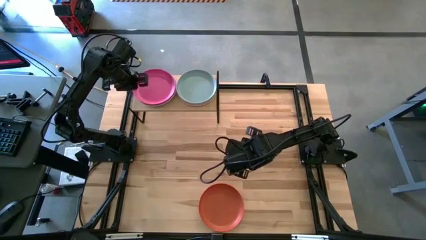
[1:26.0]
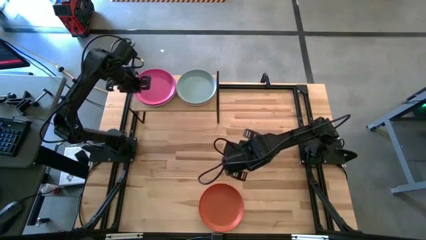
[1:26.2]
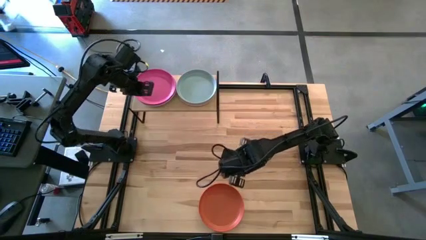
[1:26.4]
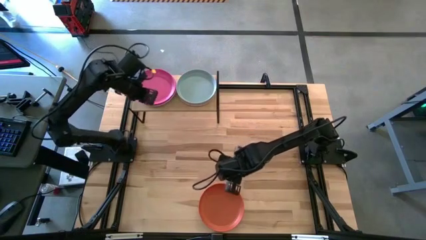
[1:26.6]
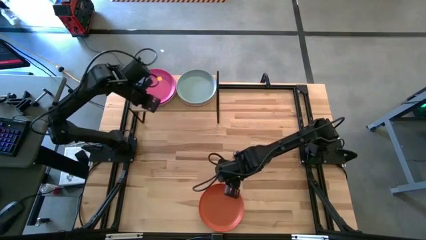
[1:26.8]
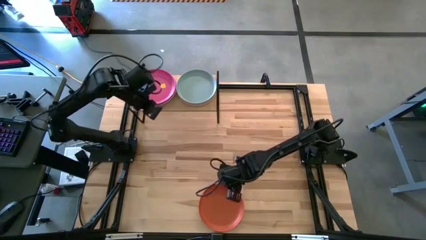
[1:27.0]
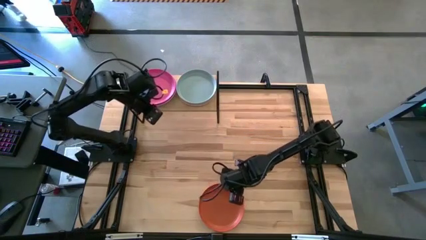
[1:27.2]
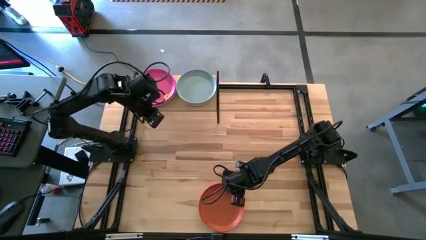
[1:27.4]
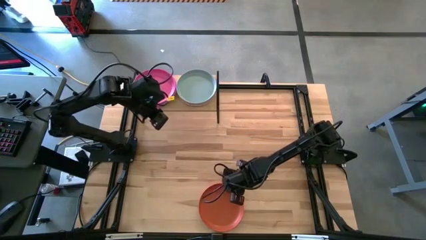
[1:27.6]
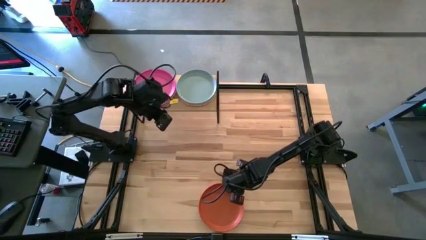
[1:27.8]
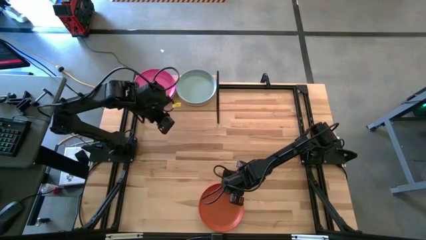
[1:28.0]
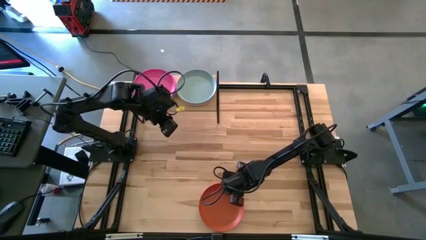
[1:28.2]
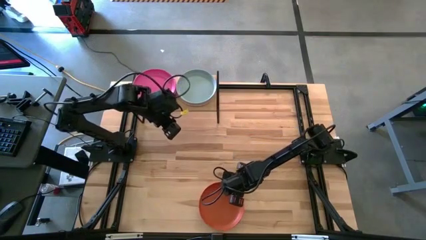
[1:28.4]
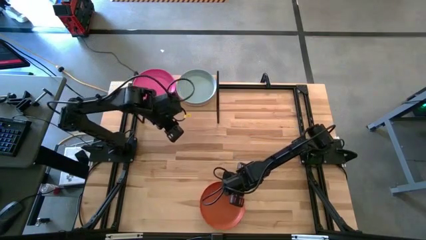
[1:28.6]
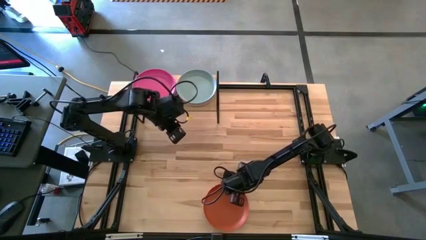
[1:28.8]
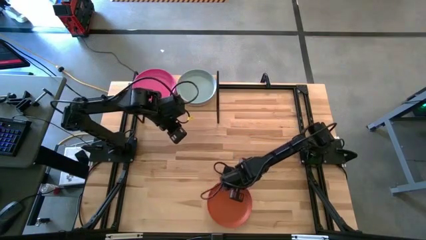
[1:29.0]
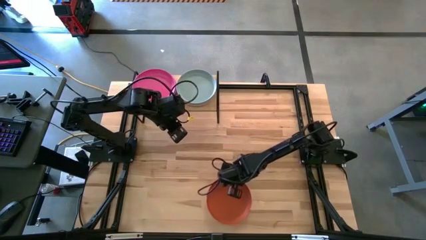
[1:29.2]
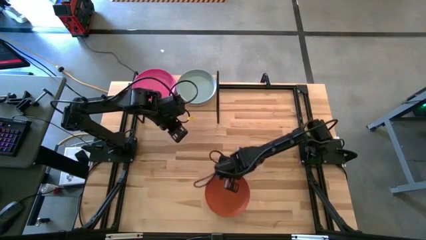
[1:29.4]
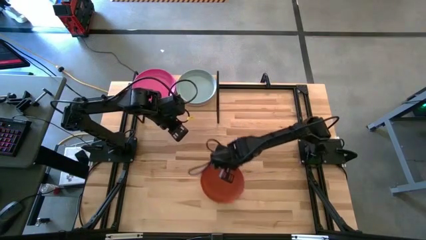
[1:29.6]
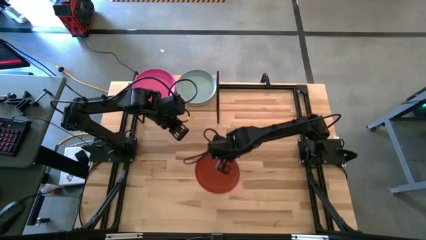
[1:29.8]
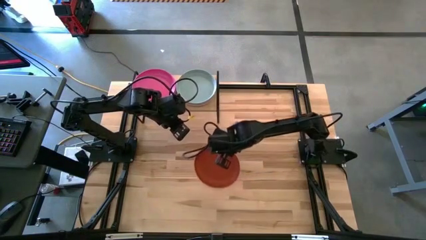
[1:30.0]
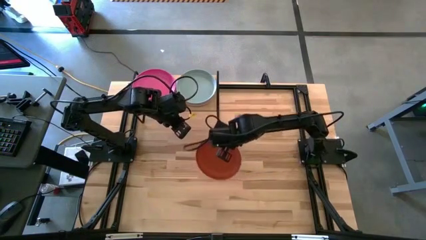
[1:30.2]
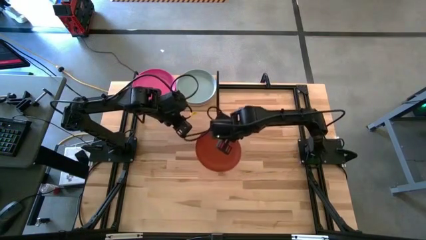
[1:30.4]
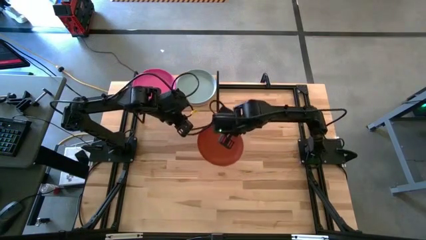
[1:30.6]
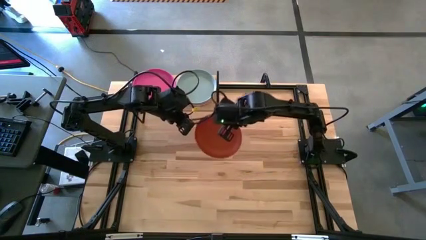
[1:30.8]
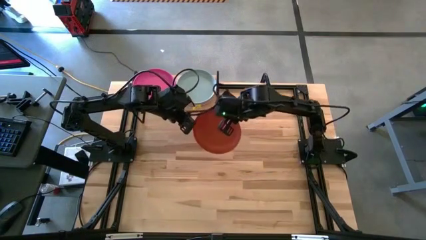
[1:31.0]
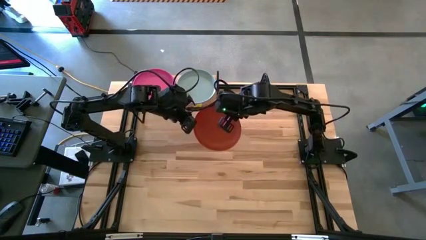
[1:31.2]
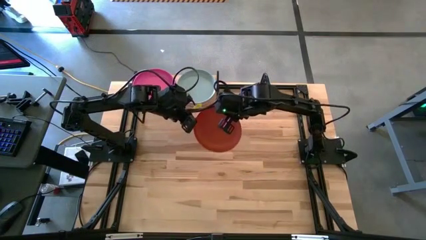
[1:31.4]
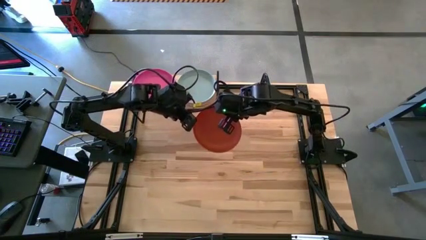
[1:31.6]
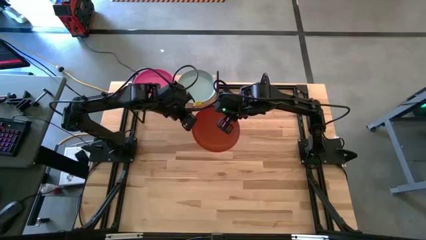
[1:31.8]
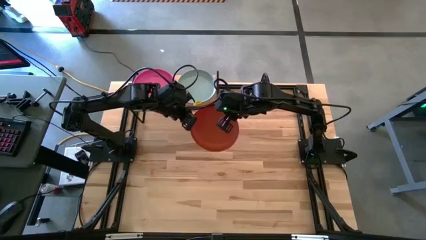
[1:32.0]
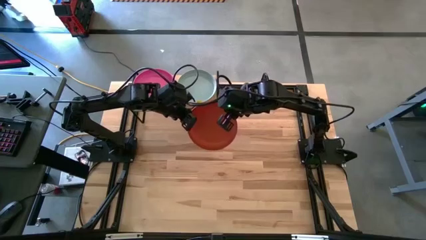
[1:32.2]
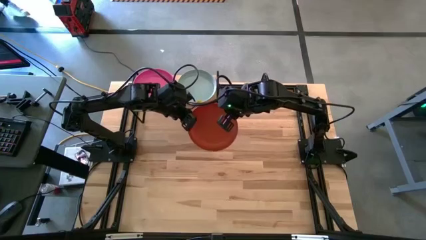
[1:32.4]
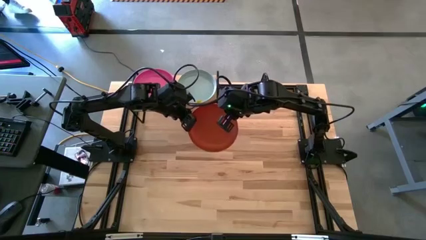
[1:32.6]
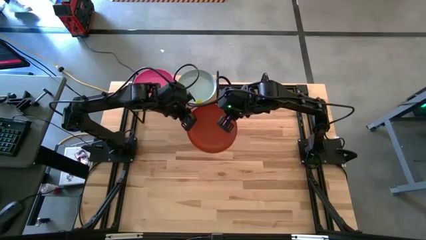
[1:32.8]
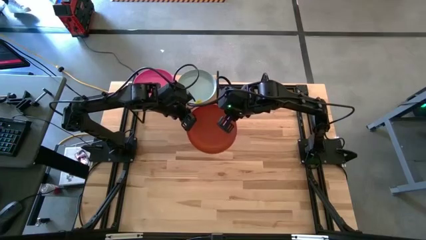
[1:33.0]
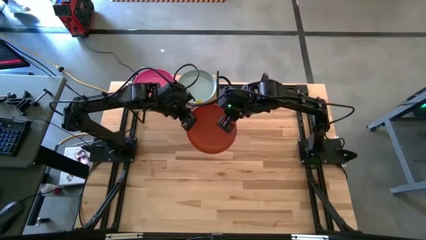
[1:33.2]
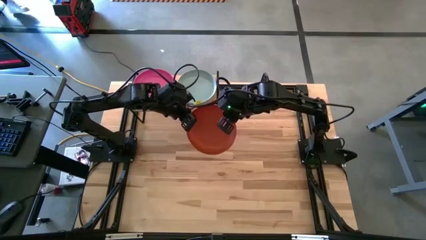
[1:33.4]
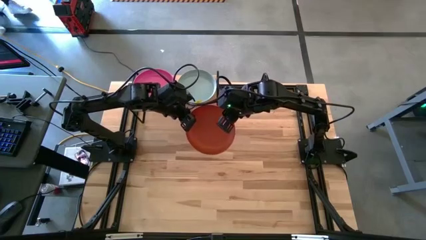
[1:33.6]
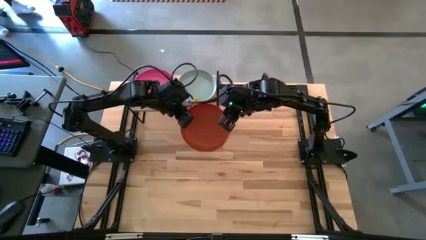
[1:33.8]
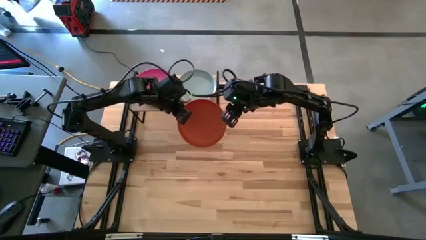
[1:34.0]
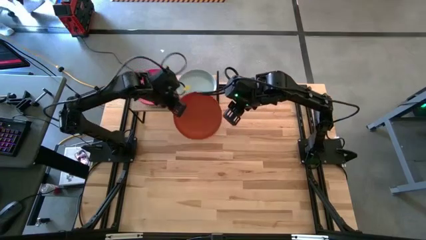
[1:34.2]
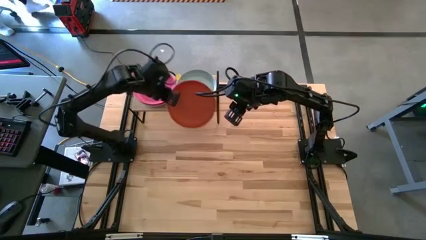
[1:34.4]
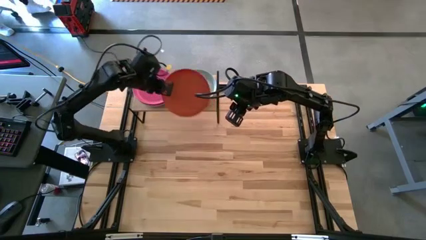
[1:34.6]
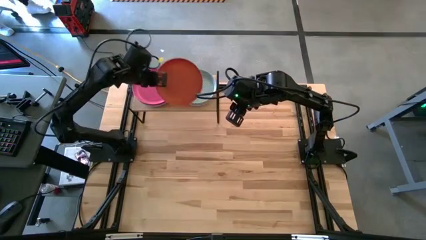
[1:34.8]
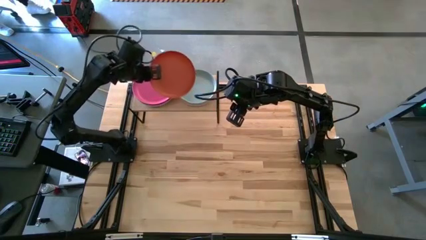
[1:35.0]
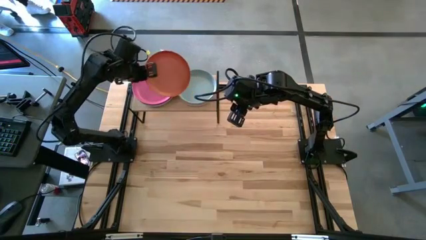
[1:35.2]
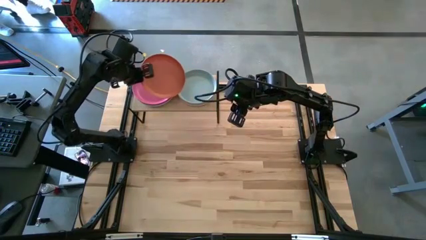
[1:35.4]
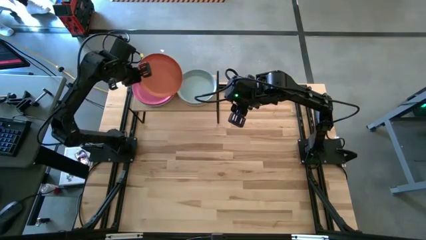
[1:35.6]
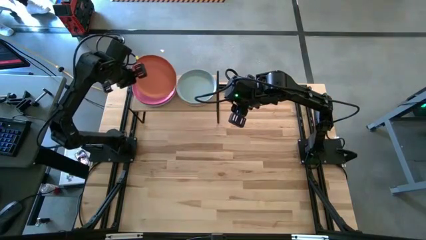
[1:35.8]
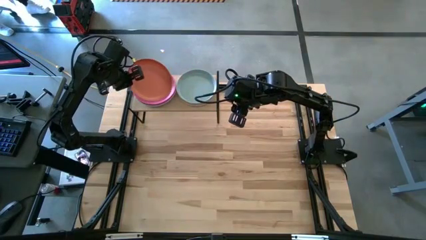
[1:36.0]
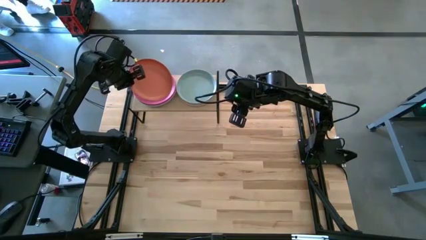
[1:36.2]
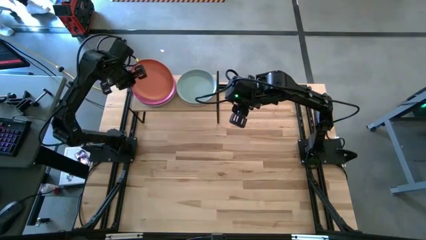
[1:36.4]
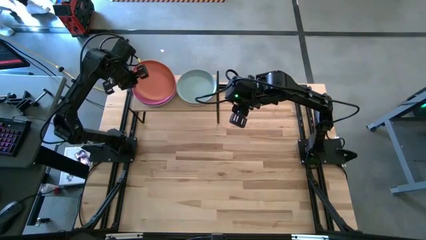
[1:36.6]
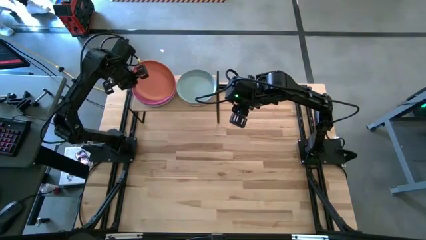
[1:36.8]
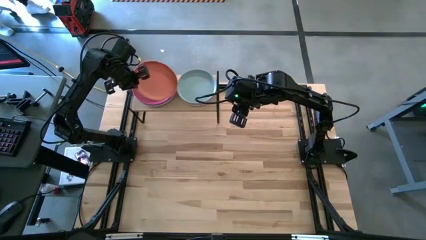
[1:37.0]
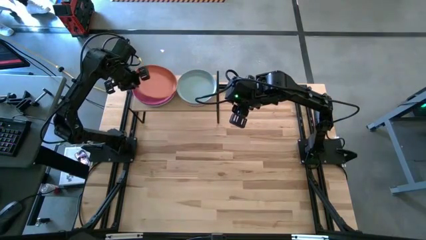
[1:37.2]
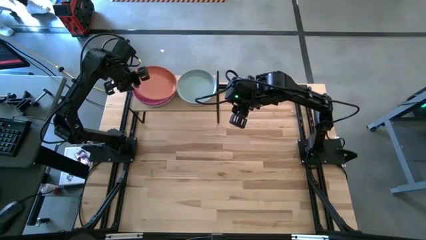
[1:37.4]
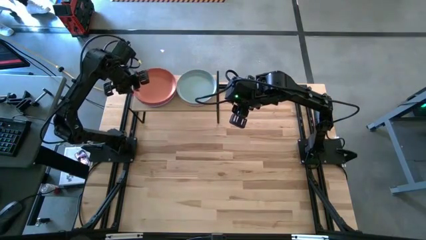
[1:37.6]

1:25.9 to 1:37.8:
Task: Place and stack plates onto a shelf
Stack the orange plate on top of the pink plate on the shelf

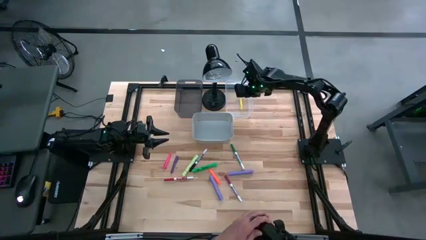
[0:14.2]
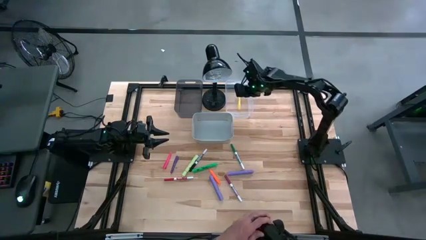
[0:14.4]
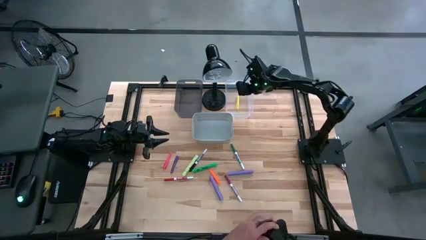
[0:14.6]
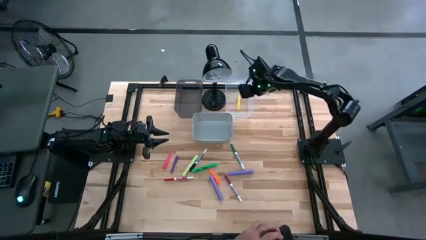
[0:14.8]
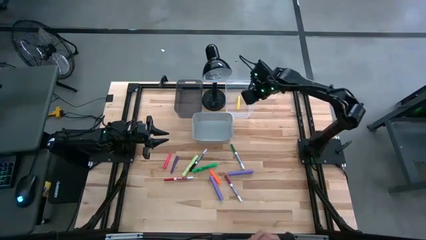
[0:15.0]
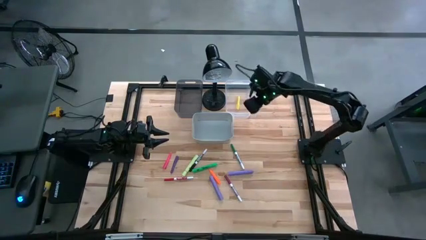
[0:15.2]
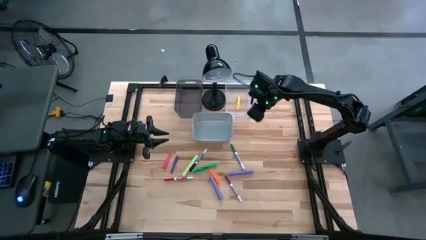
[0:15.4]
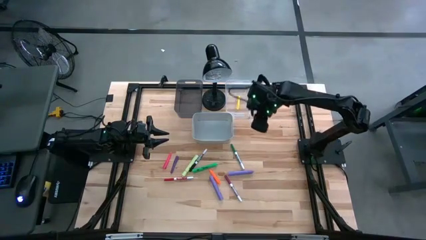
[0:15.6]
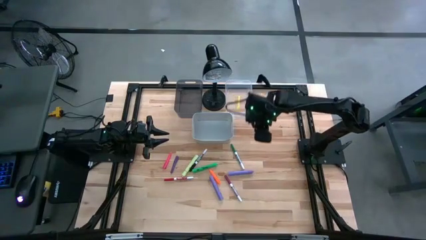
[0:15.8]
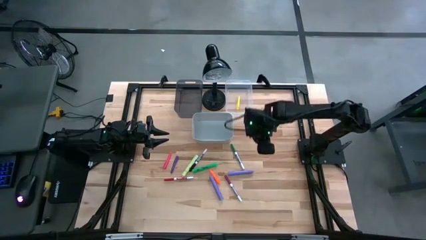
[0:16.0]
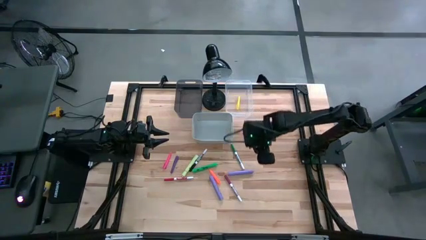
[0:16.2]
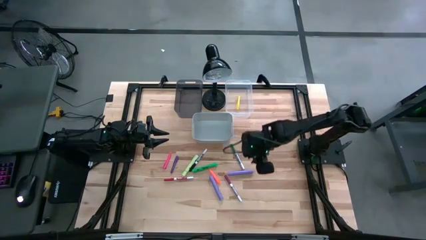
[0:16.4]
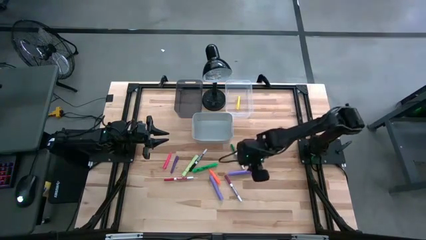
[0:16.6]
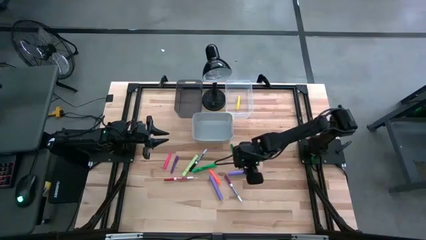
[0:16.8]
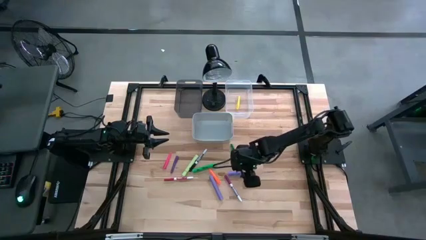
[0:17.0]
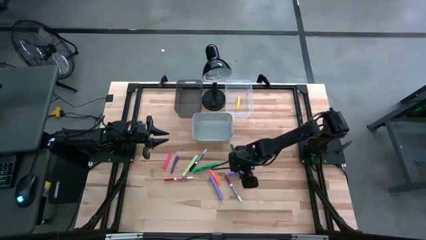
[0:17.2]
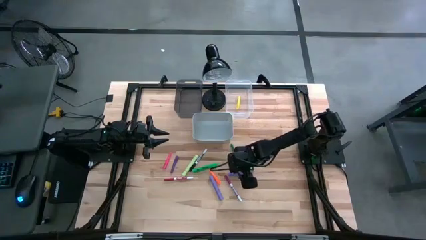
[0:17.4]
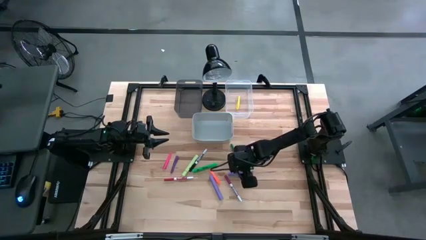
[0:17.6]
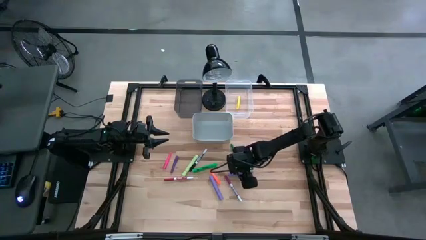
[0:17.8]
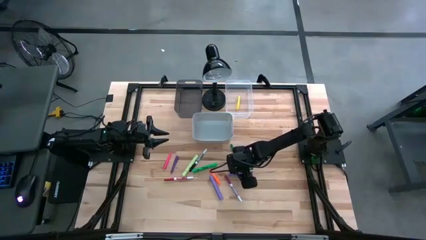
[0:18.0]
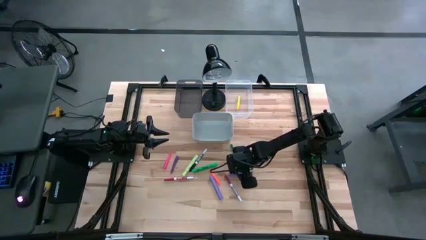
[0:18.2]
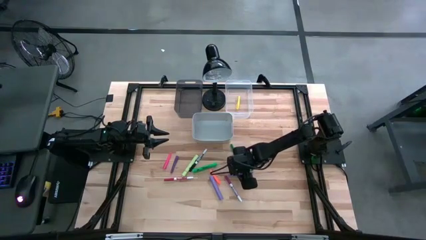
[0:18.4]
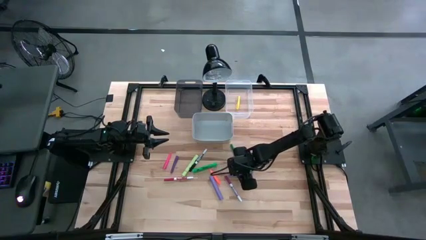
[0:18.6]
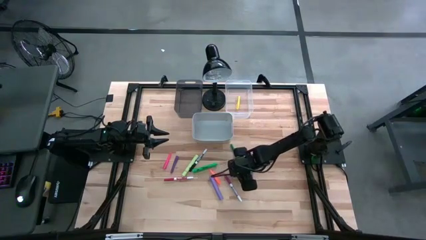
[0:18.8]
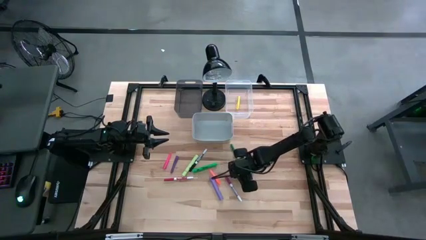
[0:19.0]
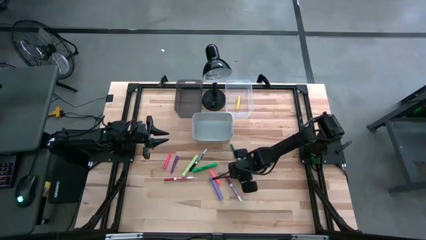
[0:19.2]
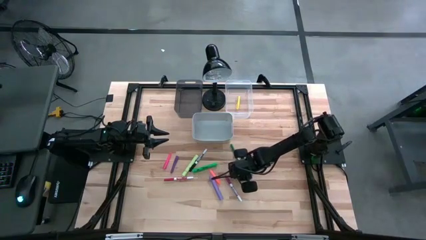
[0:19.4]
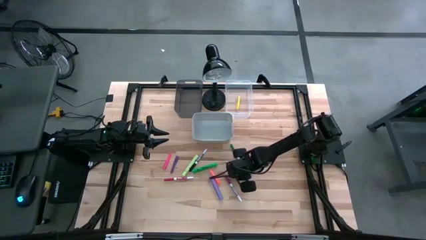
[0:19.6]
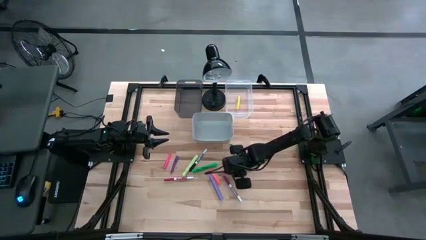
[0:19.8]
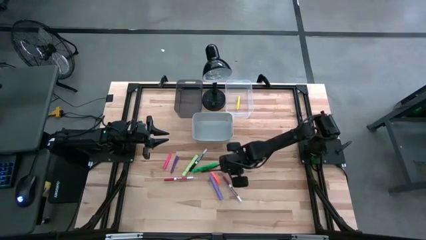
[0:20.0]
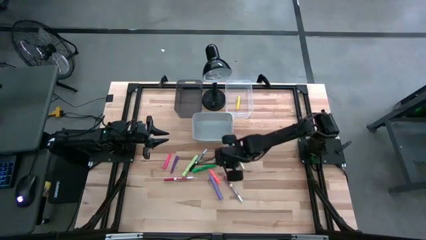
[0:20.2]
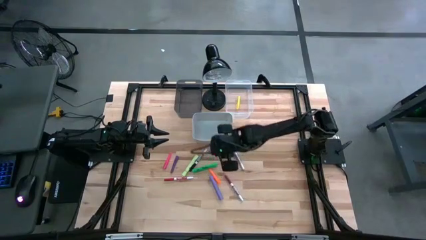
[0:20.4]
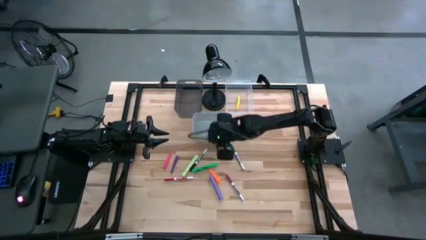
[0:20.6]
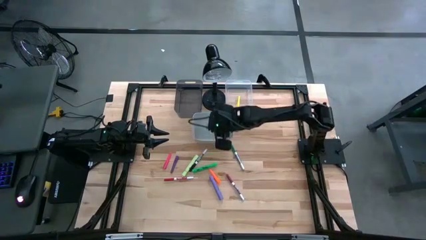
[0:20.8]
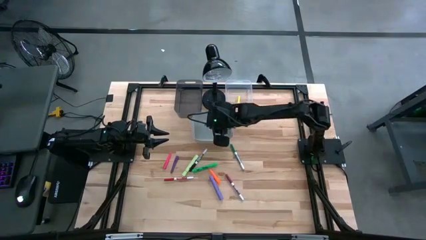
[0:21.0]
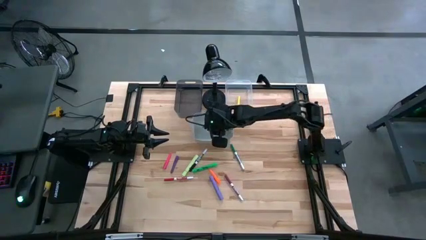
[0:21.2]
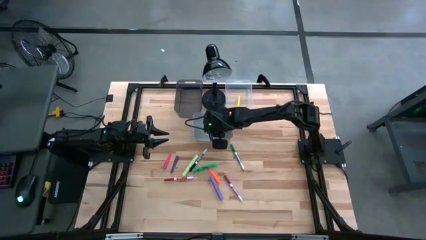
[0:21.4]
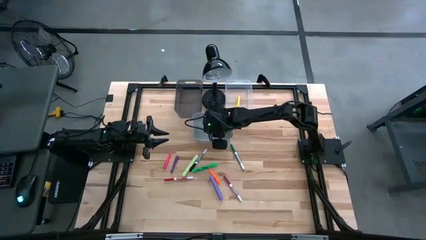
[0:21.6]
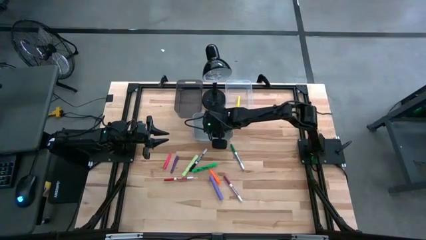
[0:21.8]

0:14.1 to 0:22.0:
Task: Pick & Place Markers
Put the large purple marker into the gray bin
